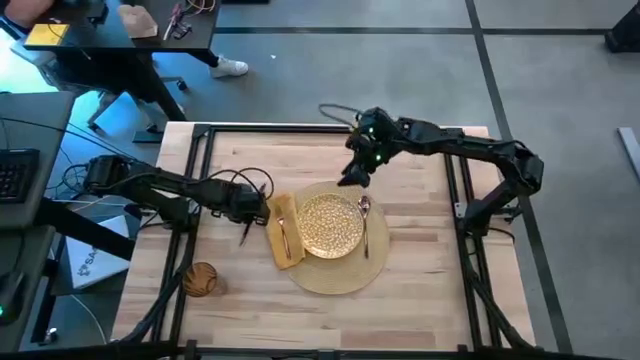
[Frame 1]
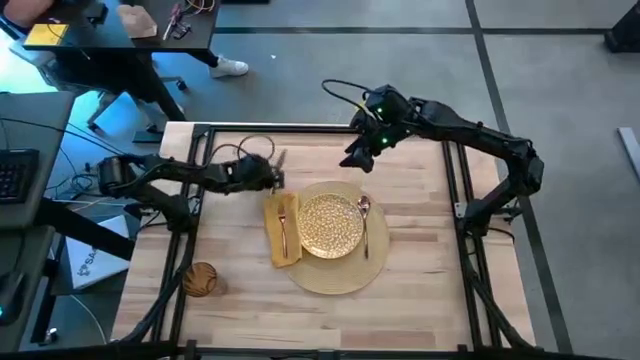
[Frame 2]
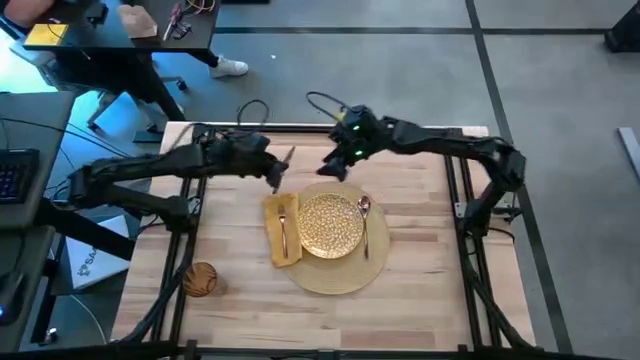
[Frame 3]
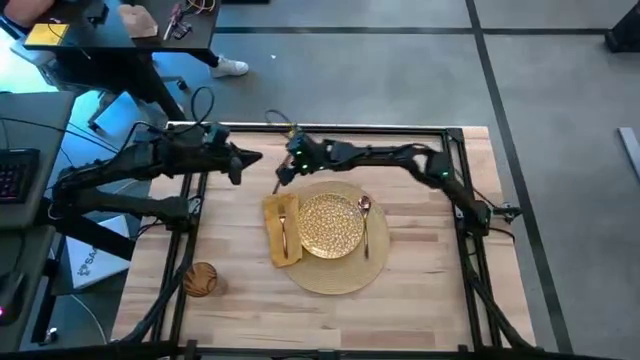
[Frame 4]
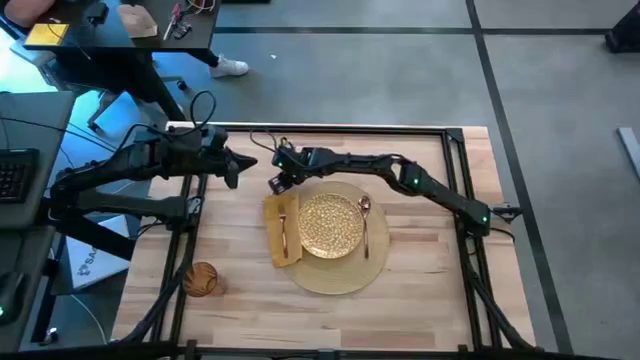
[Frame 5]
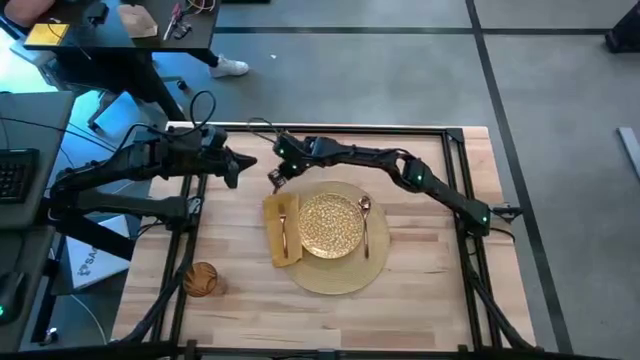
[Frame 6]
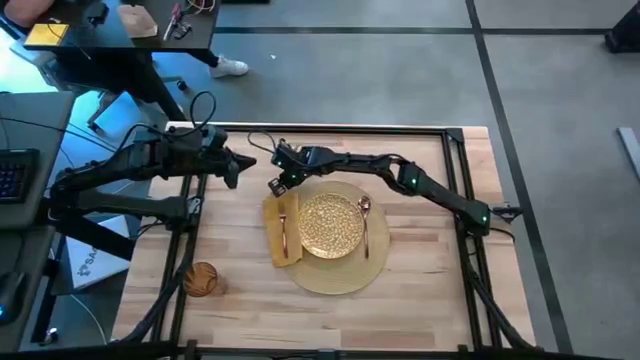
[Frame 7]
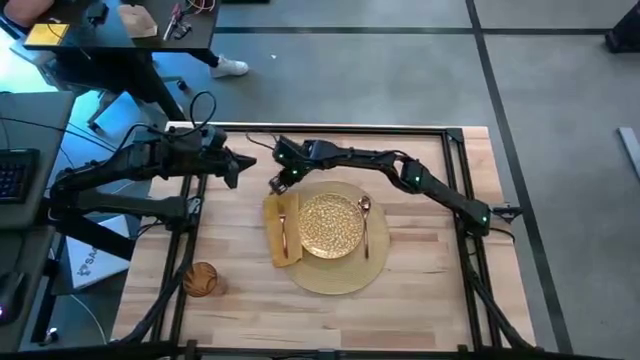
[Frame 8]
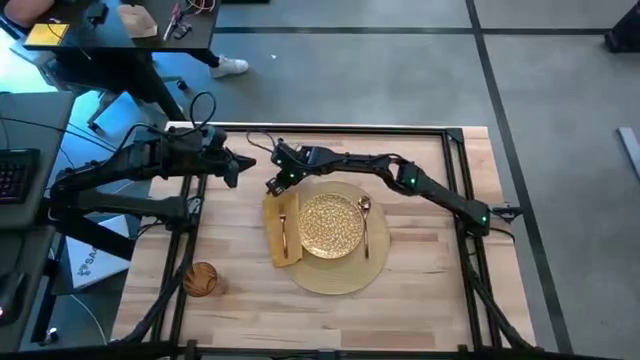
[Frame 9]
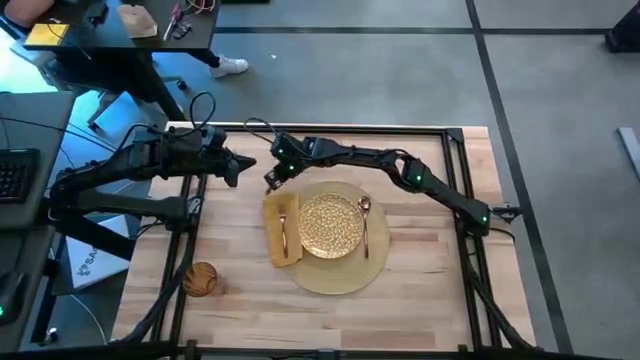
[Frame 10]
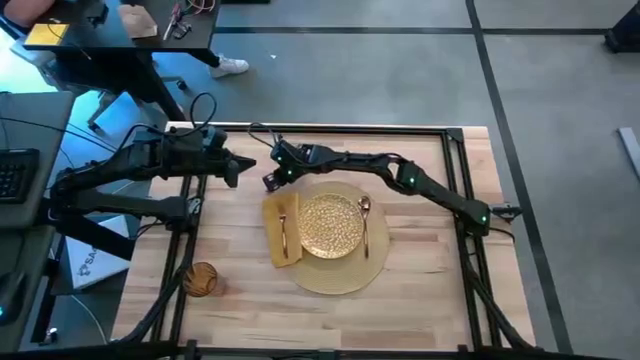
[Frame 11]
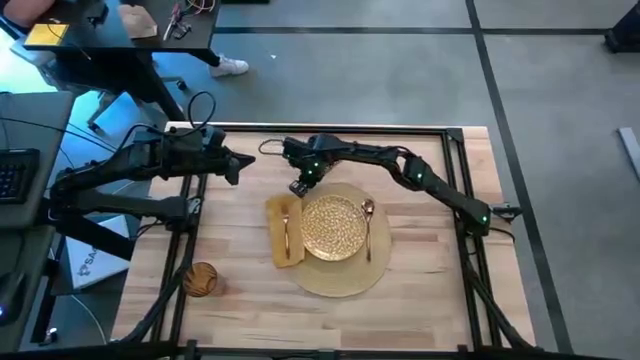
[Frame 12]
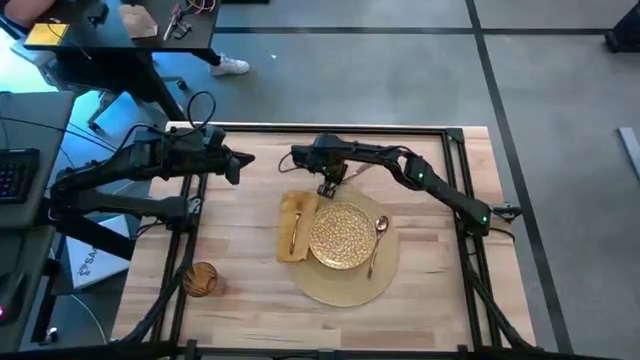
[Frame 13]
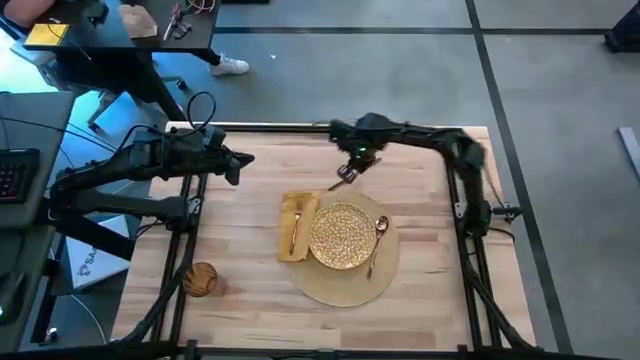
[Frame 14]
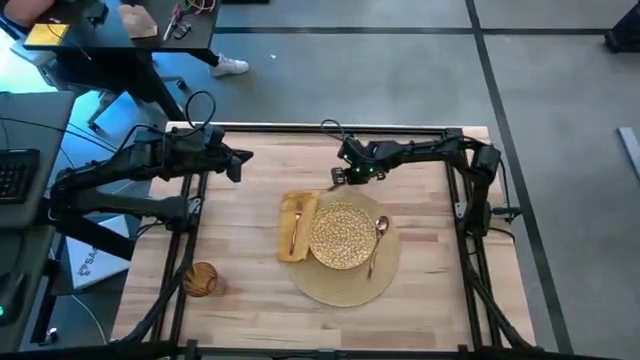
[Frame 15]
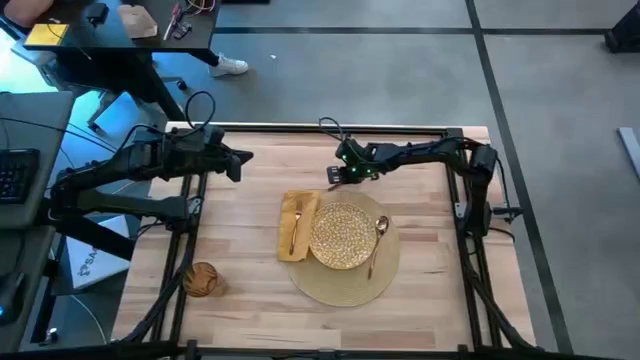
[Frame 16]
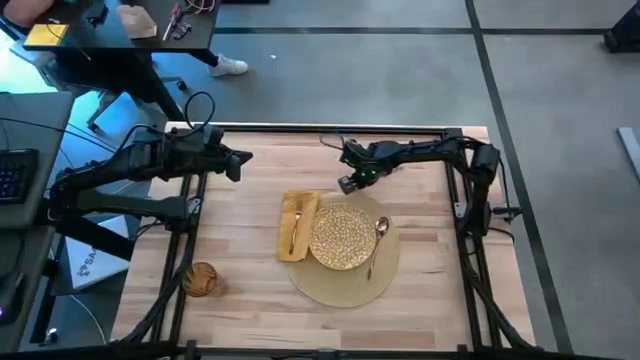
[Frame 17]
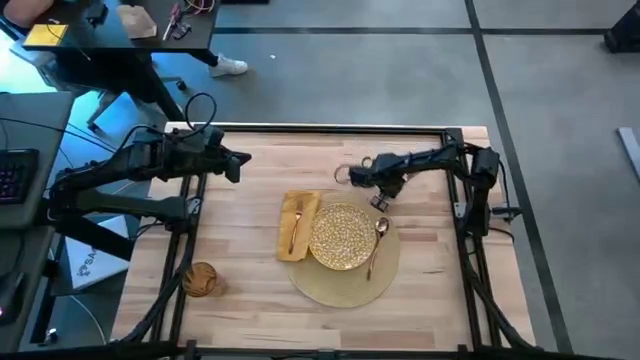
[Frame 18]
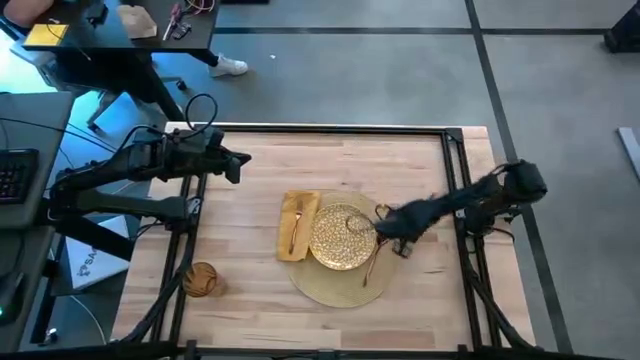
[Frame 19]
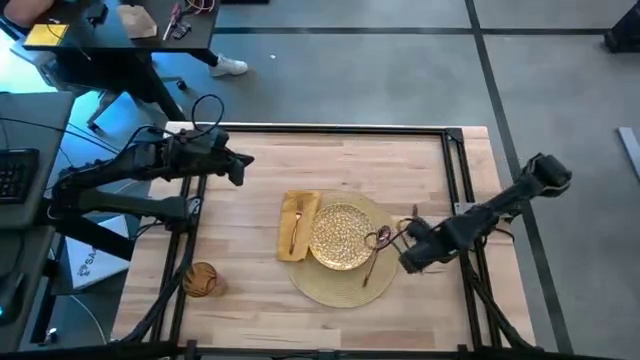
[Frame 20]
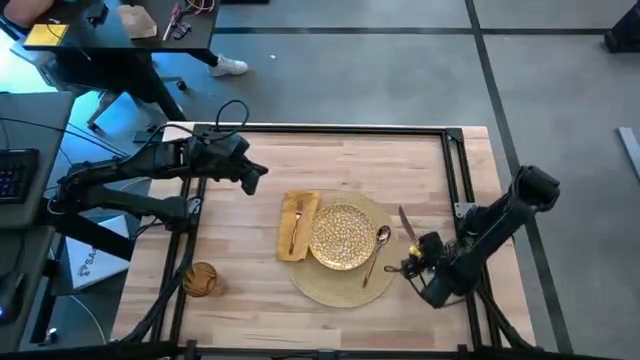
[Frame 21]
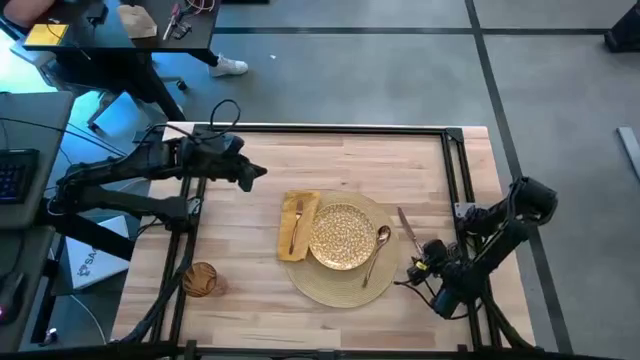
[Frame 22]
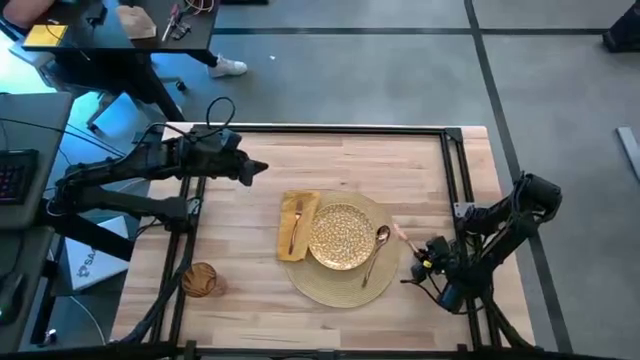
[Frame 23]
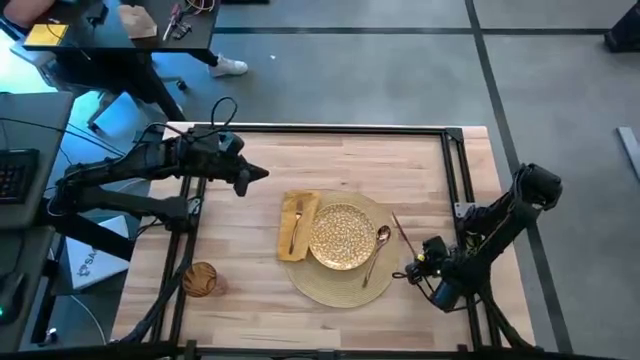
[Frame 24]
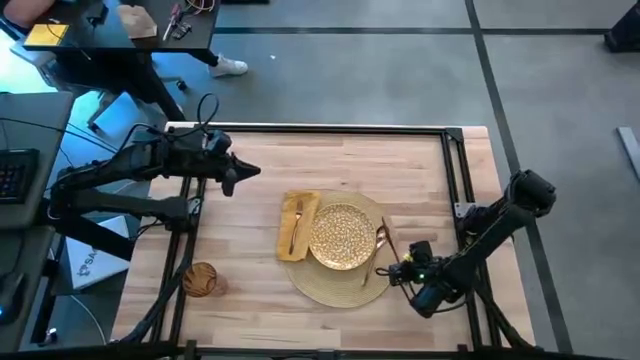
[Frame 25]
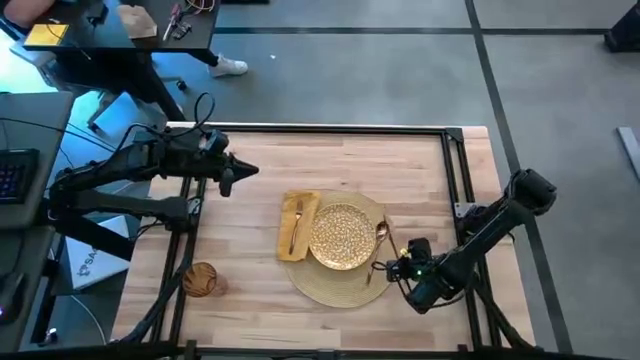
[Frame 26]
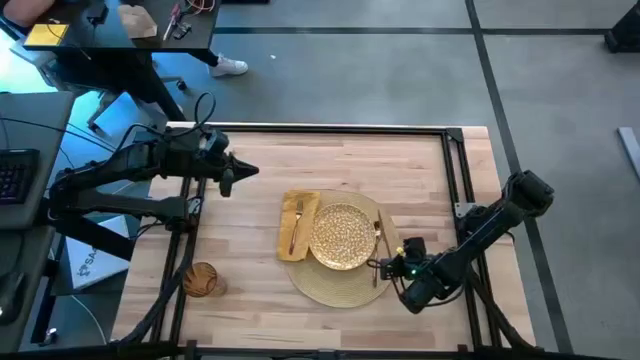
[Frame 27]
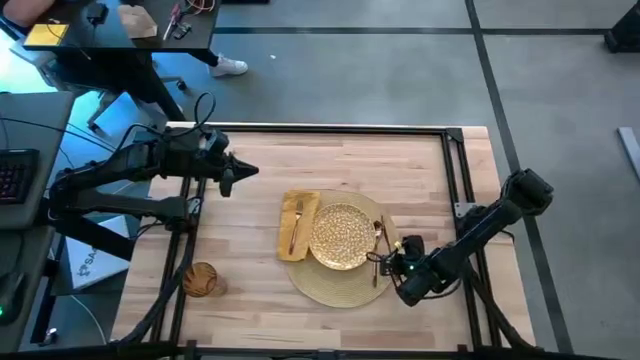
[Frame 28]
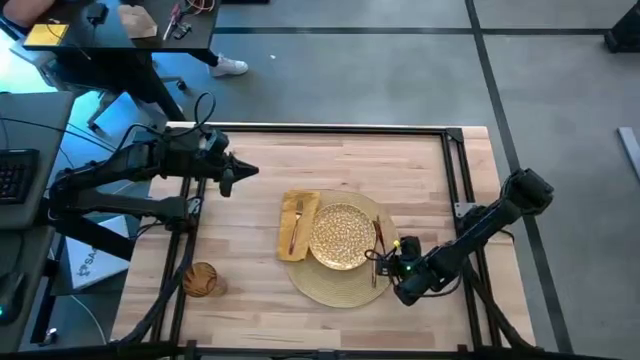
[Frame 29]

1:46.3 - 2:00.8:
Task: Set table place
Put the brown table knife on the brown placemat to the right of the brown spoon

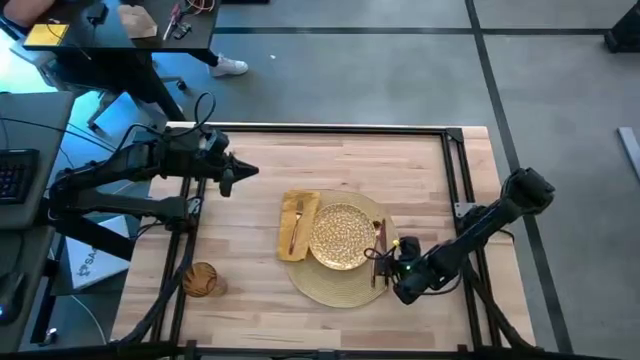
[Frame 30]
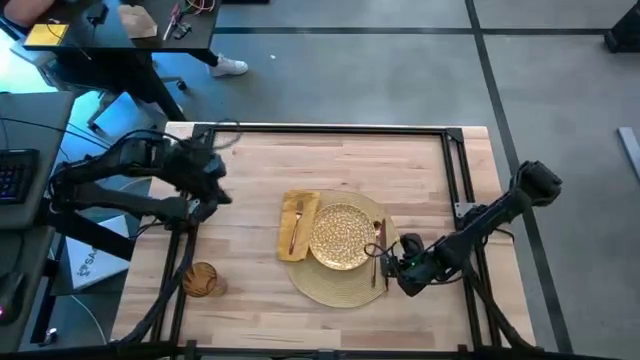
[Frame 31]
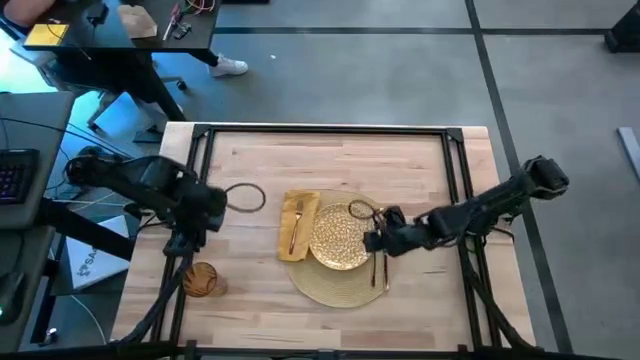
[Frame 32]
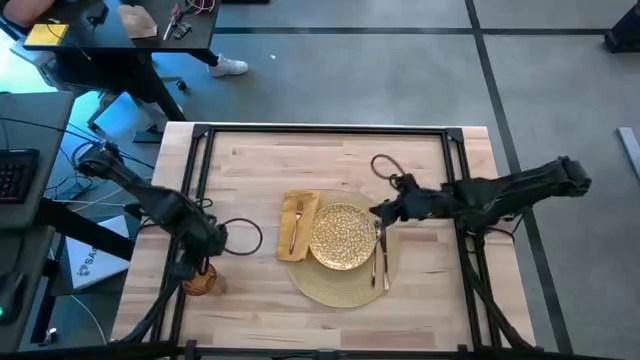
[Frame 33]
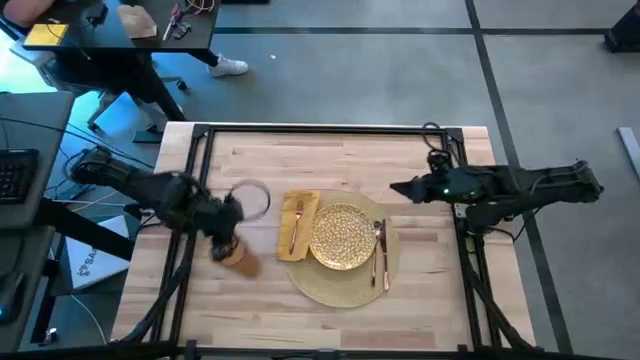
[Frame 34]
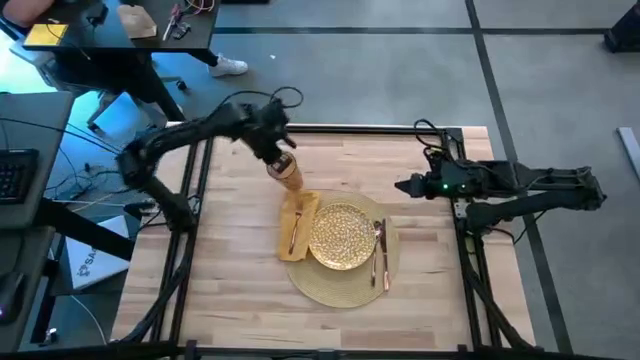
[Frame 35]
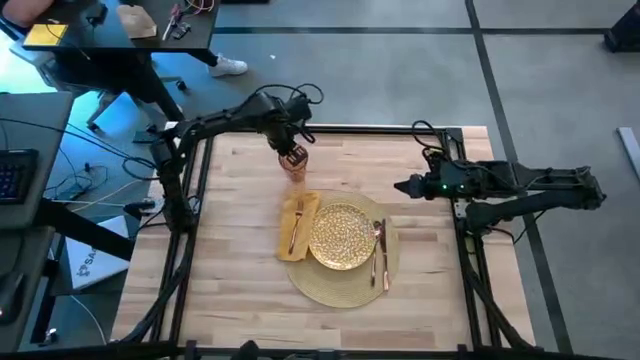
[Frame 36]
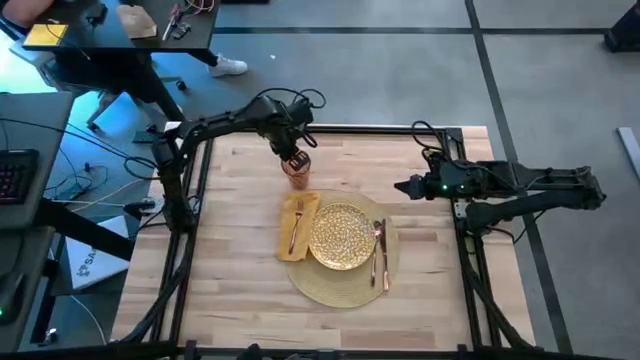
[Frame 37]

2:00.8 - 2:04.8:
Put the yellow cup to the top left of the table on top of the brown placemat

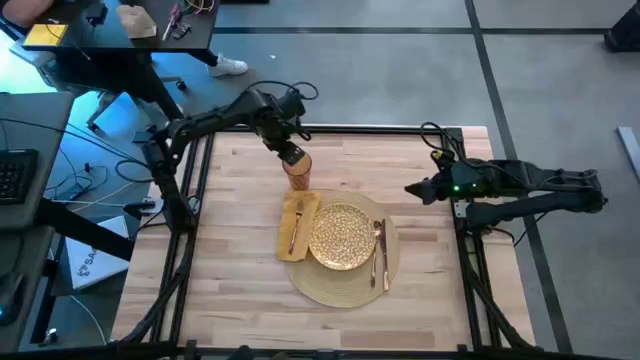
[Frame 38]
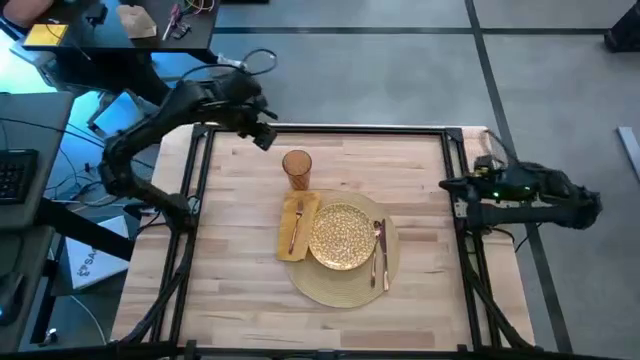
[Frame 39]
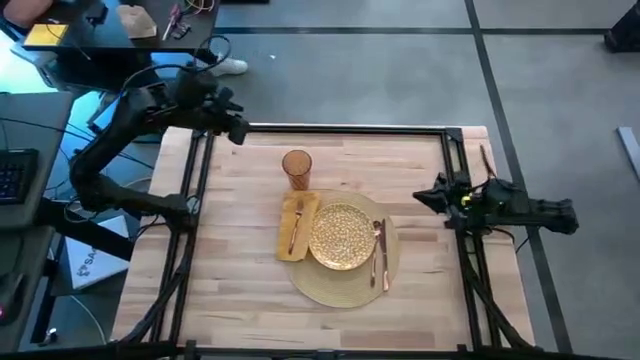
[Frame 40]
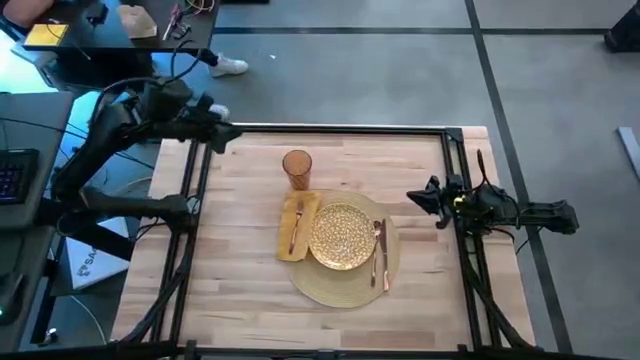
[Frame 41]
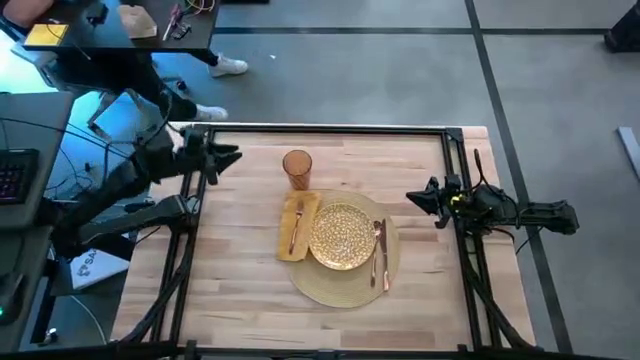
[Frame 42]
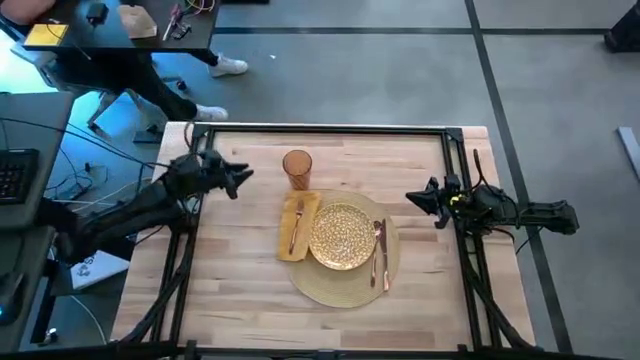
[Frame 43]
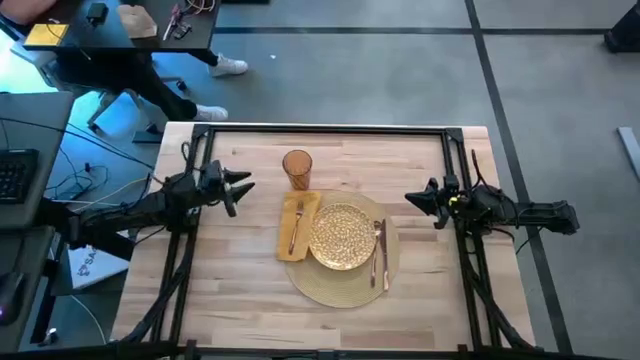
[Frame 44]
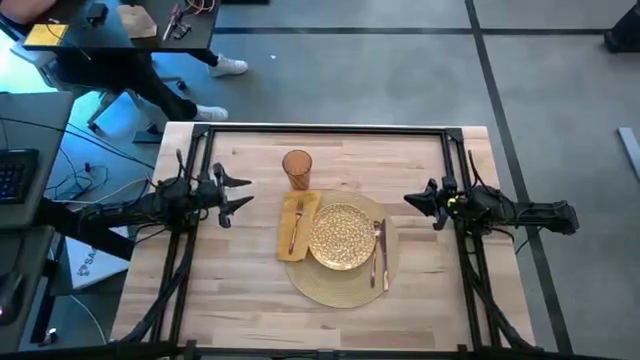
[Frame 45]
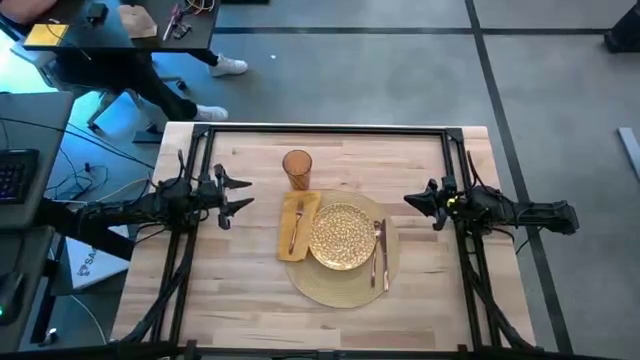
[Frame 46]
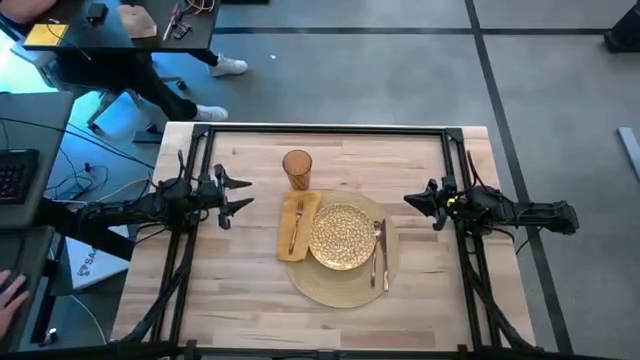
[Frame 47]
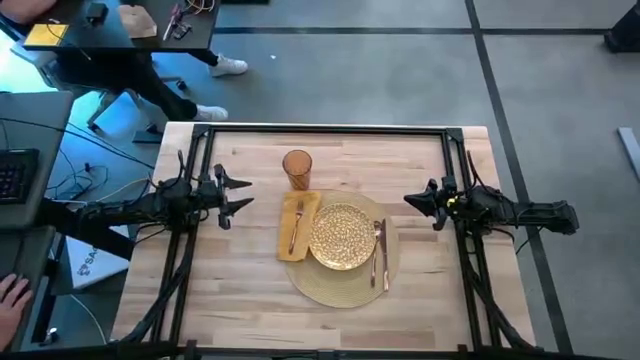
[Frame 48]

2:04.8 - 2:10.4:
Return to Home Position
